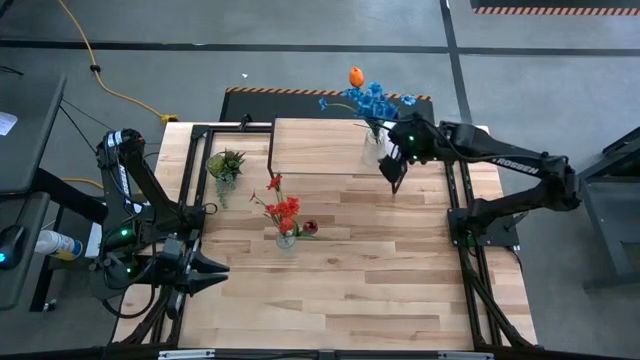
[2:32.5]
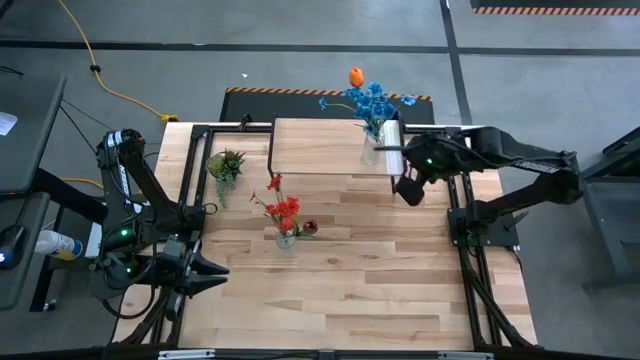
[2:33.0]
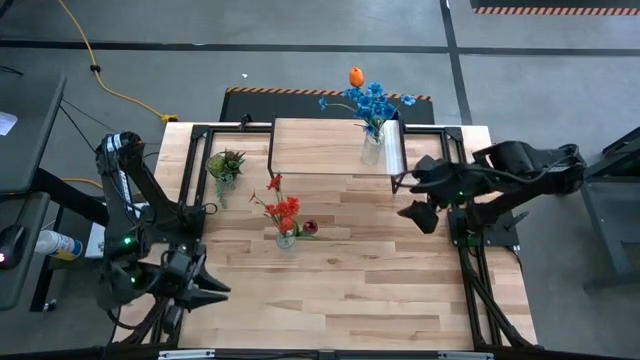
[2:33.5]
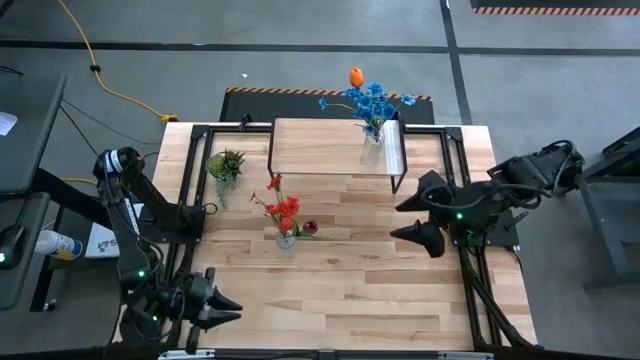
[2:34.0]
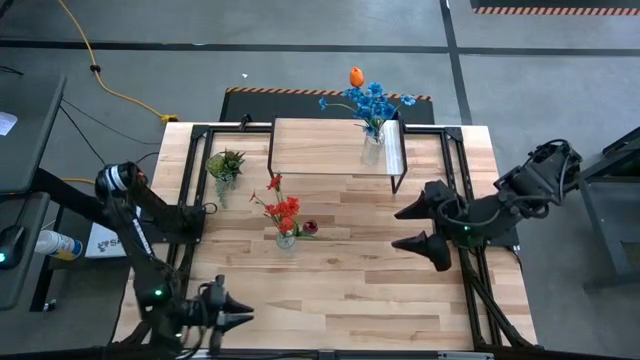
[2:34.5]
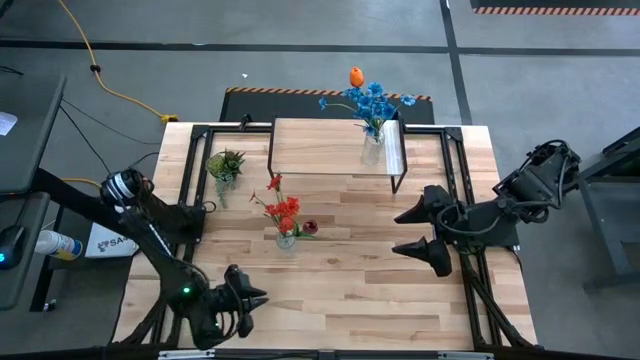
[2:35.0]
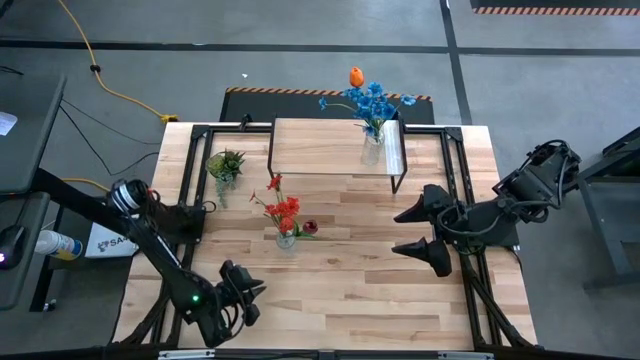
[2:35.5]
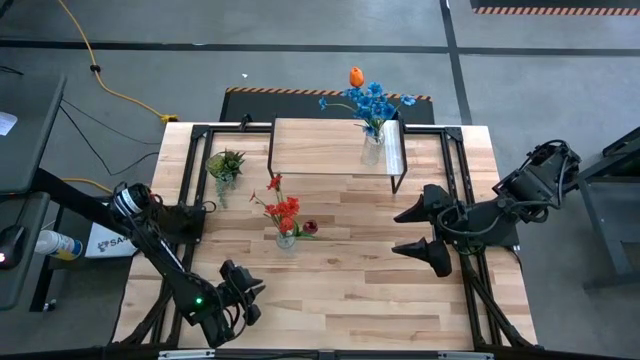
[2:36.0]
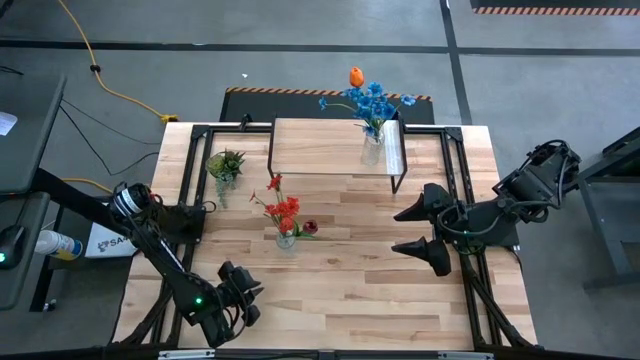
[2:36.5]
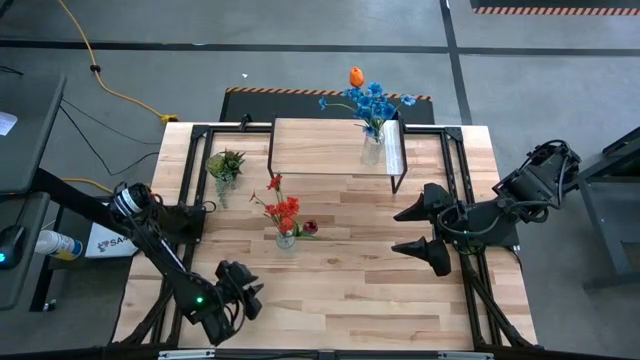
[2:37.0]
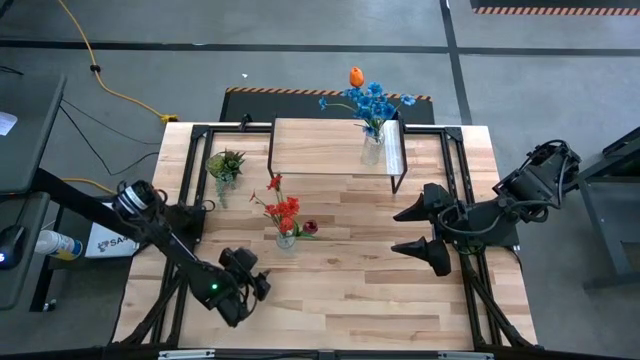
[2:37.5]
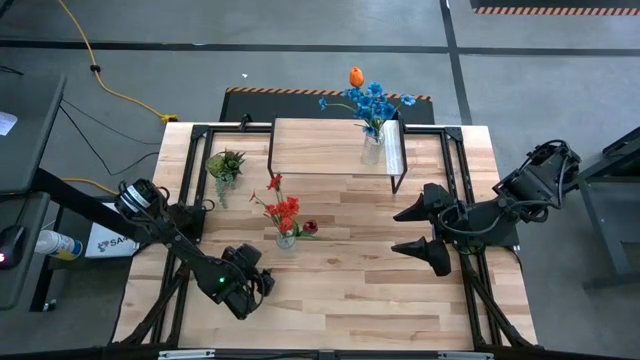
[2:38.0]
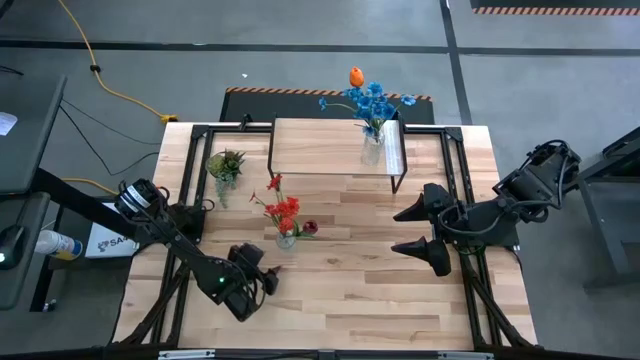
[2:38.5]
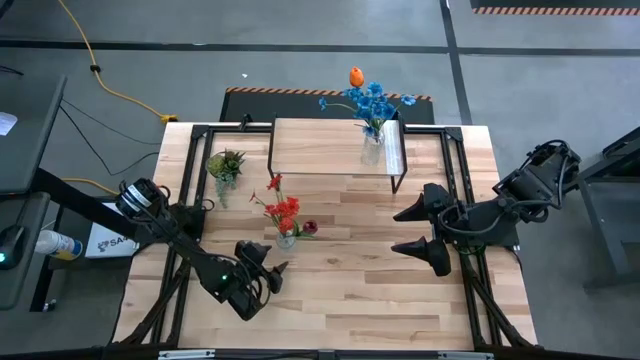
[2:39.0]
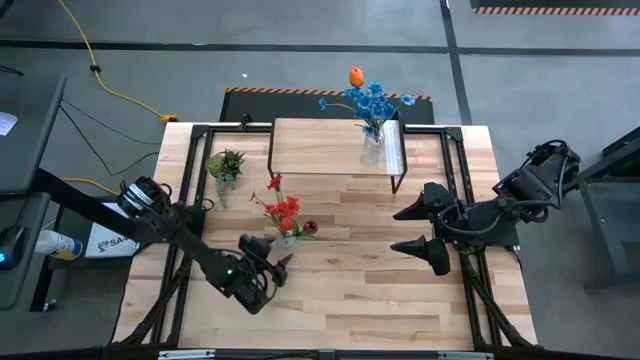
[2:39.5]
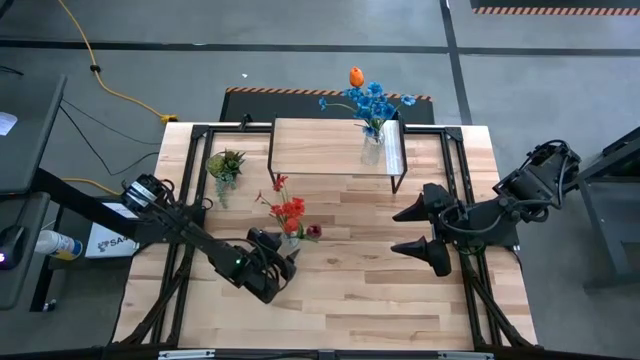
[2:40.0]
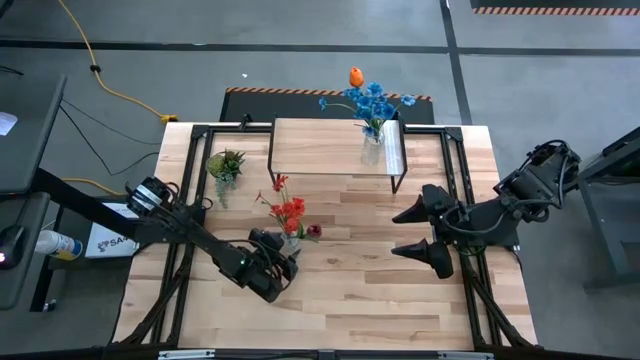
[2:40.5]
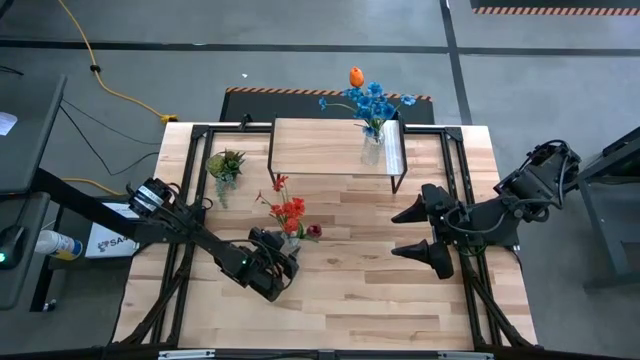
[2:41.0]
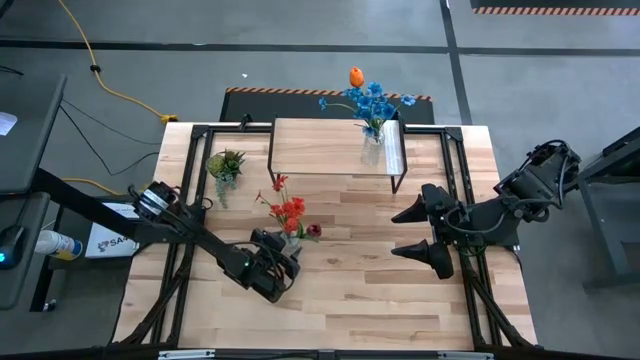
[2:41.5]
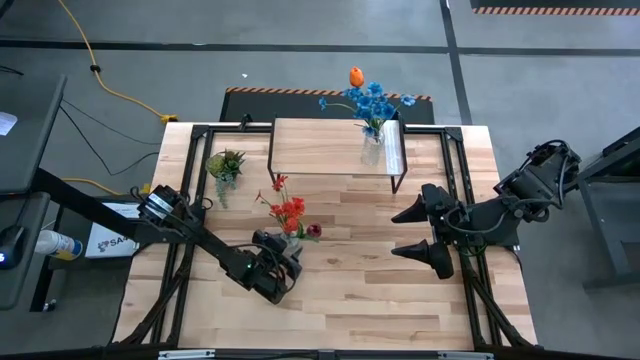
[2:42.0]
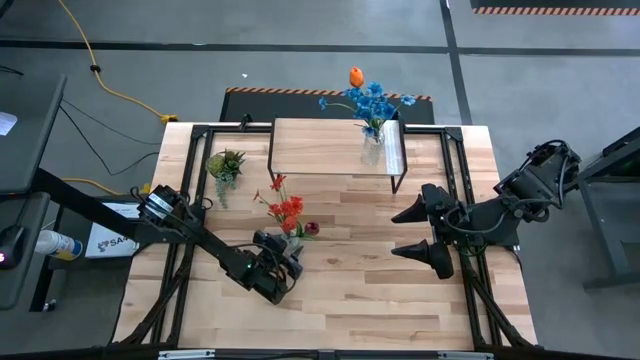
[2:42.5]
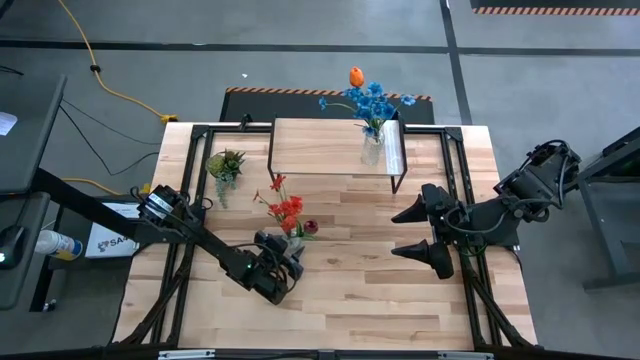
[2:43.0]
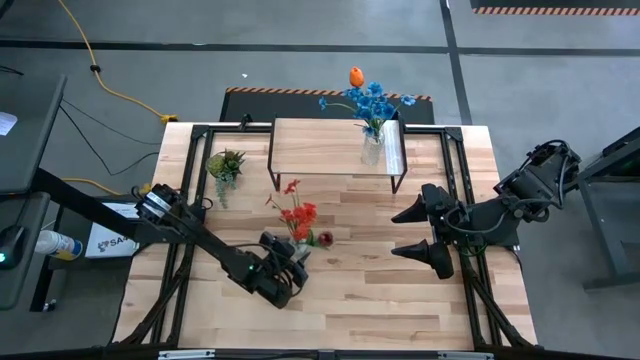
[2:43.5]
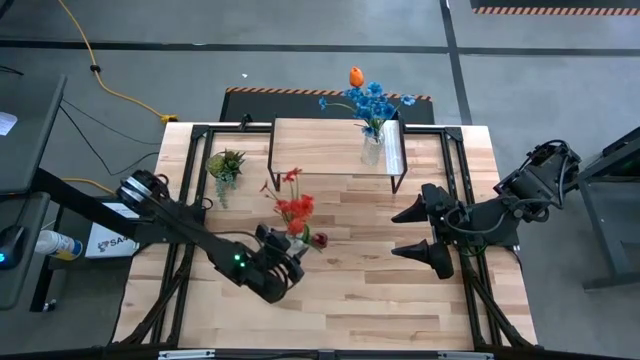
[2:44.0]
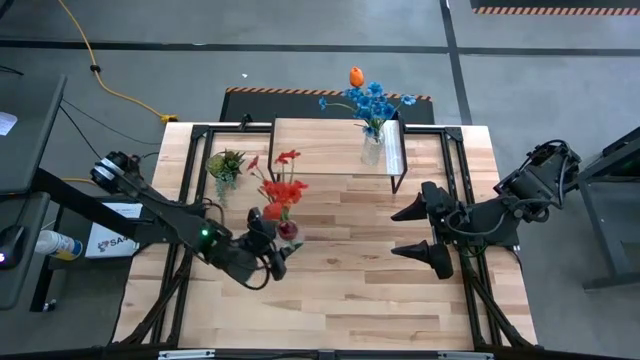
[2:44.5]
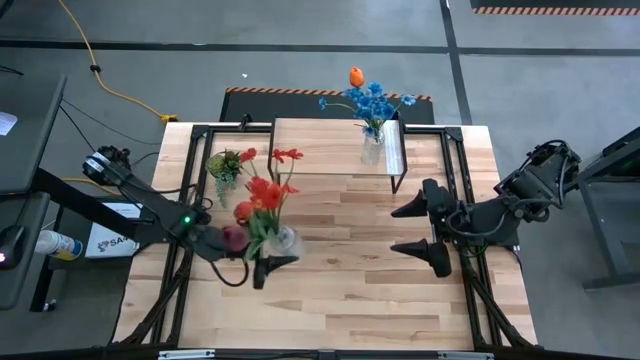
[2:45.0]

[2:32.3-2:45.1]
Task: Pick and place flowers into a vace then onto a shelf
Put the transparent vase with flowers on the shelf
